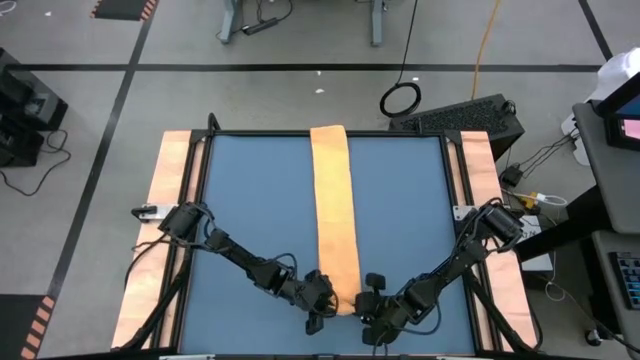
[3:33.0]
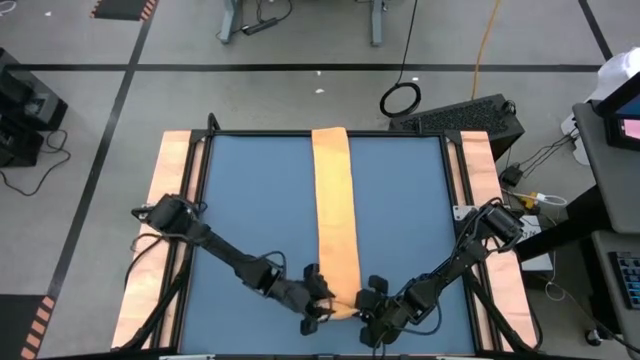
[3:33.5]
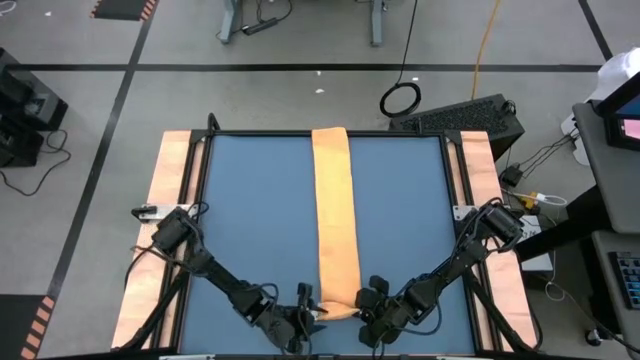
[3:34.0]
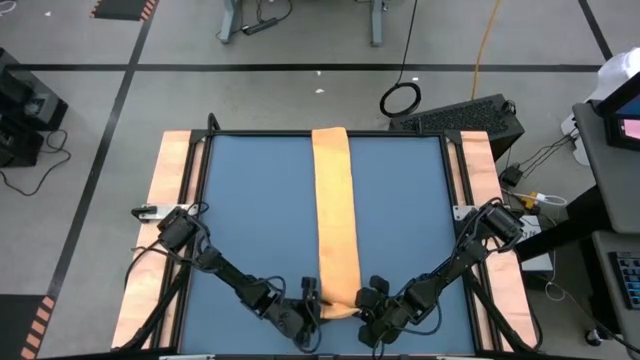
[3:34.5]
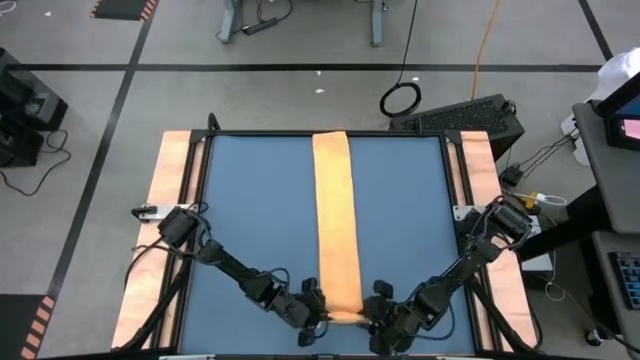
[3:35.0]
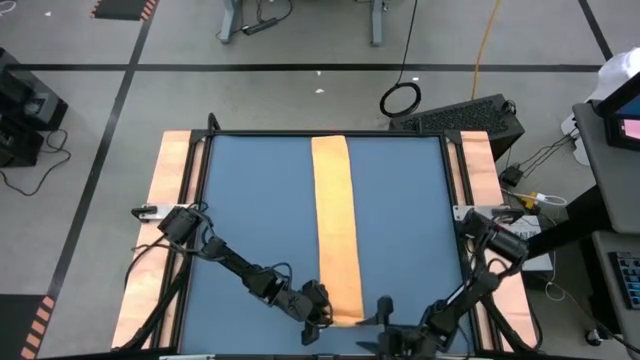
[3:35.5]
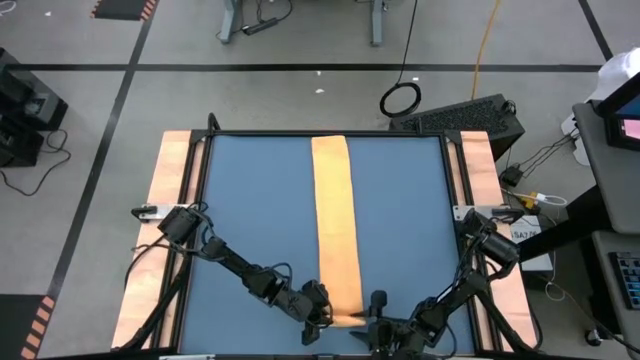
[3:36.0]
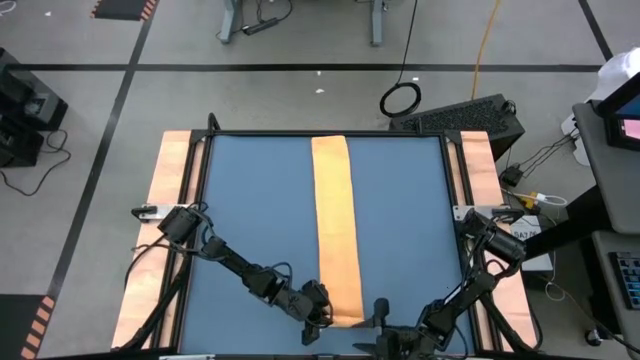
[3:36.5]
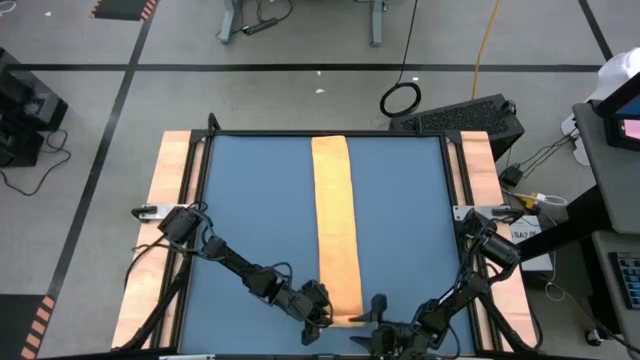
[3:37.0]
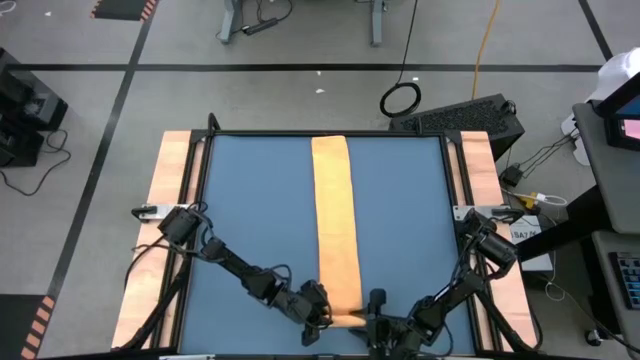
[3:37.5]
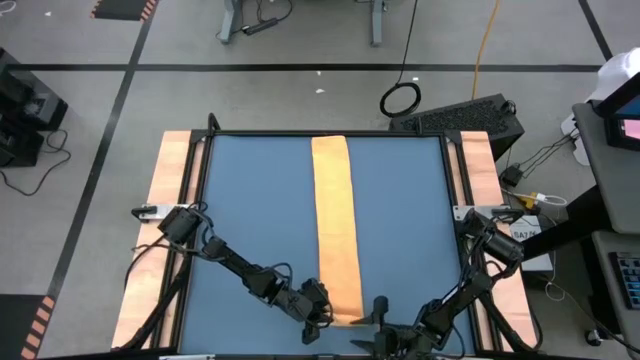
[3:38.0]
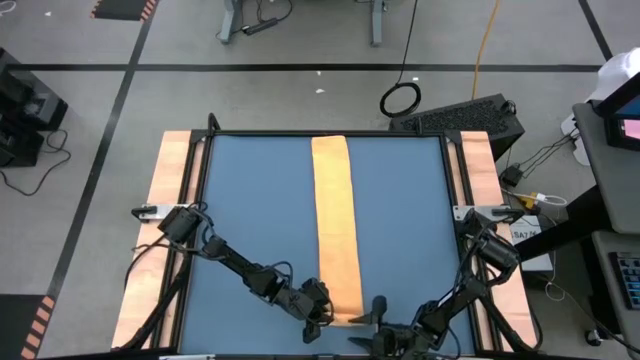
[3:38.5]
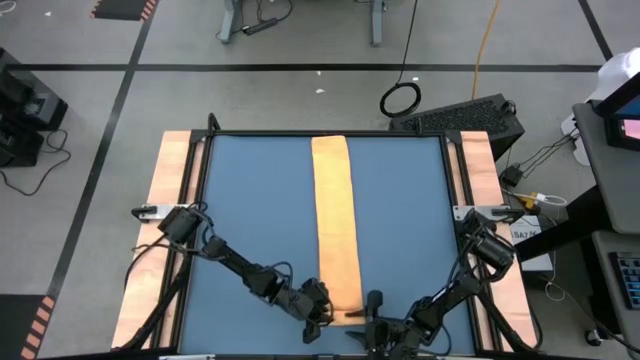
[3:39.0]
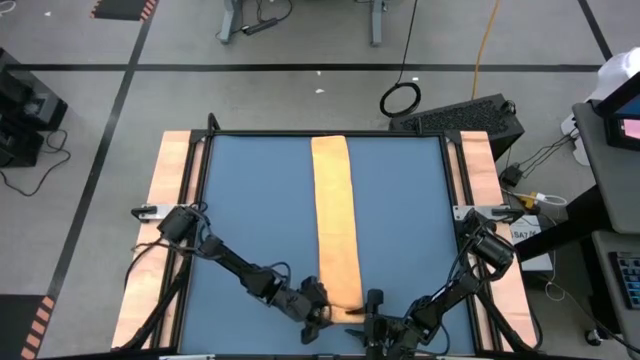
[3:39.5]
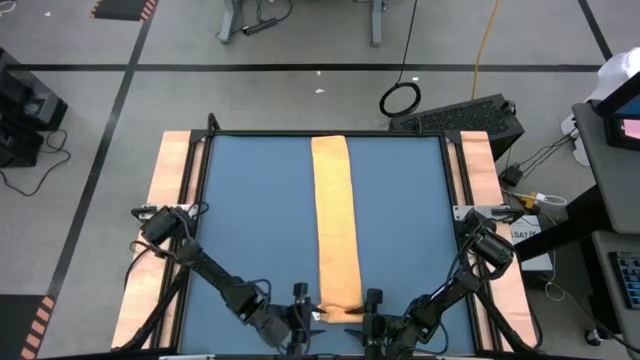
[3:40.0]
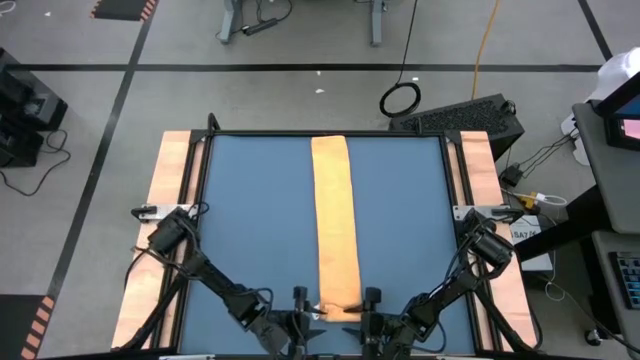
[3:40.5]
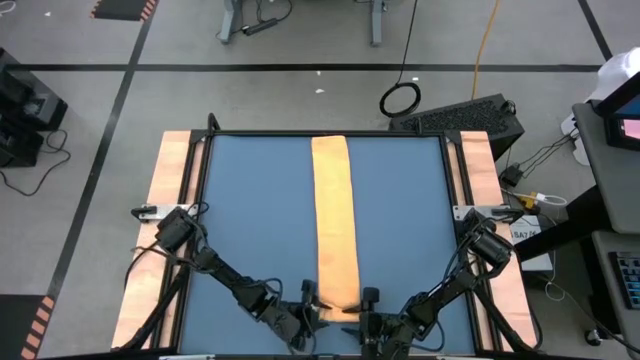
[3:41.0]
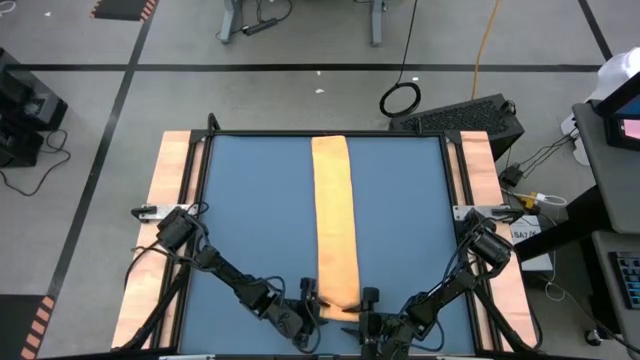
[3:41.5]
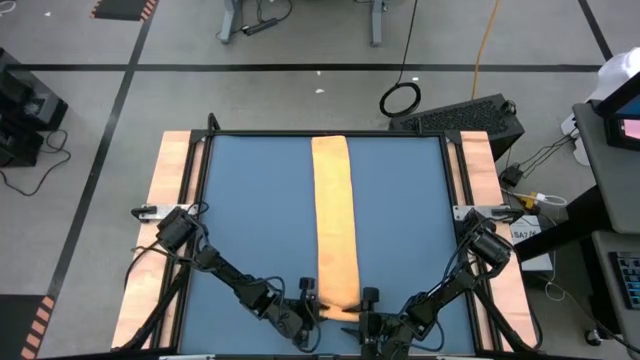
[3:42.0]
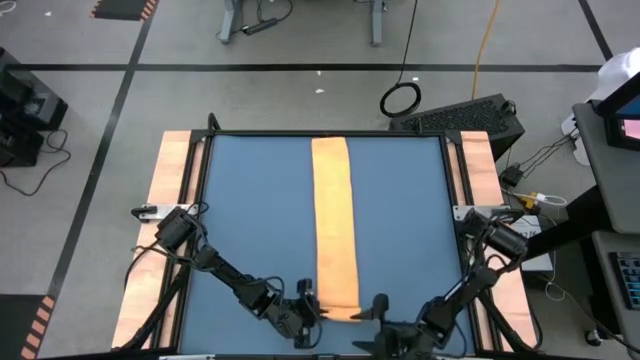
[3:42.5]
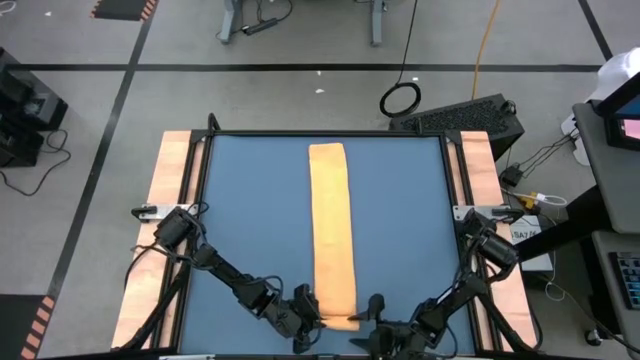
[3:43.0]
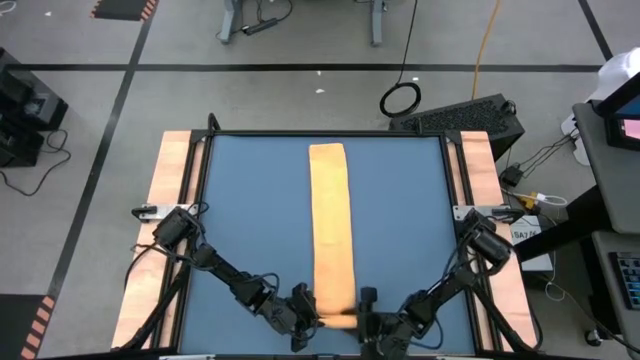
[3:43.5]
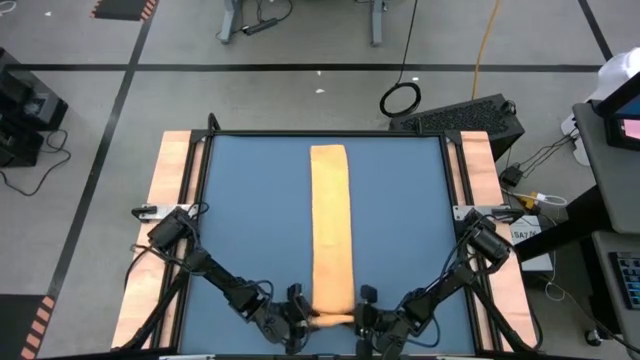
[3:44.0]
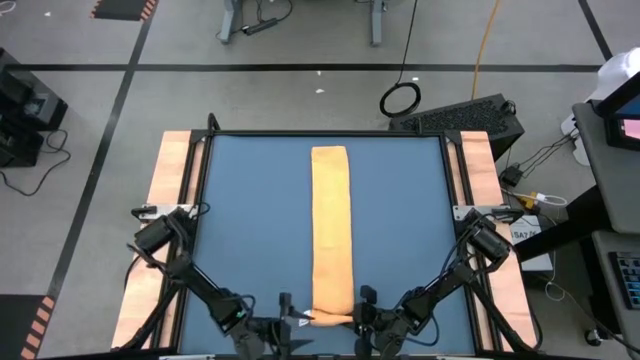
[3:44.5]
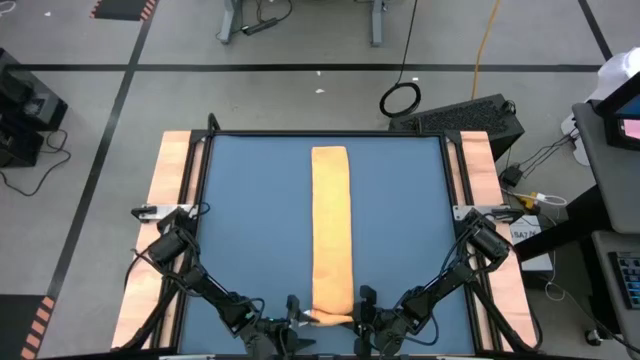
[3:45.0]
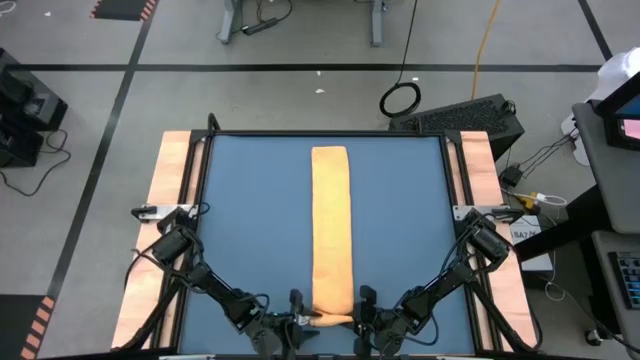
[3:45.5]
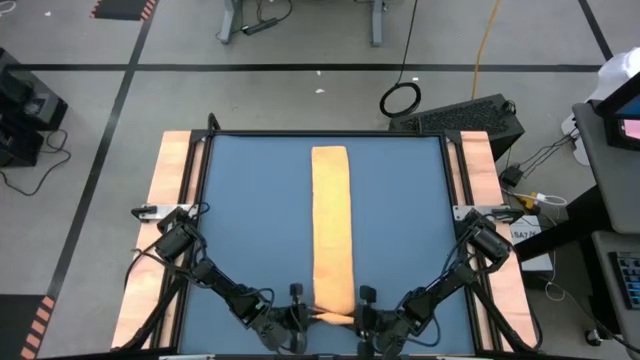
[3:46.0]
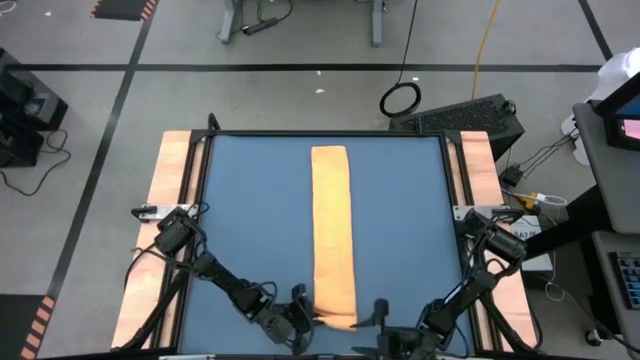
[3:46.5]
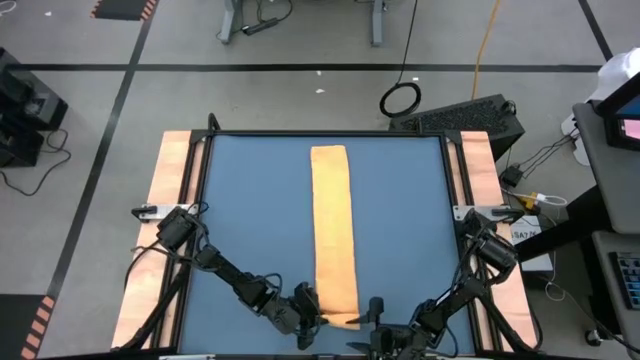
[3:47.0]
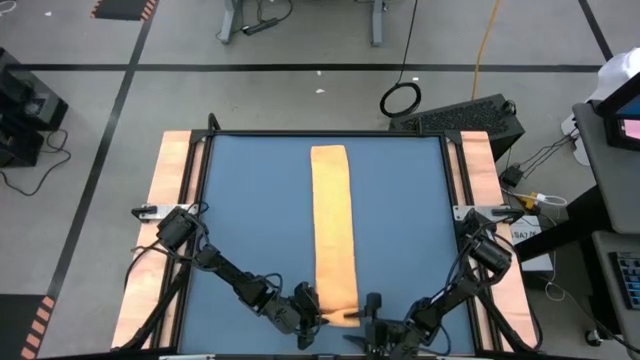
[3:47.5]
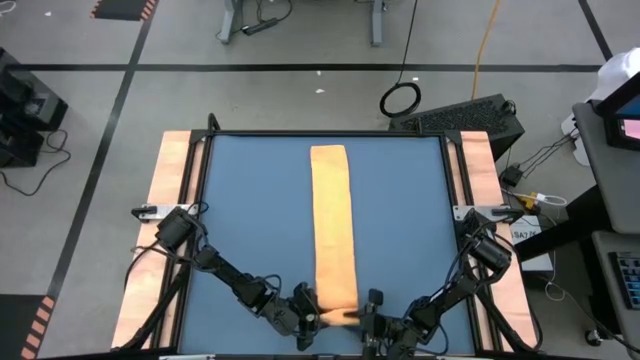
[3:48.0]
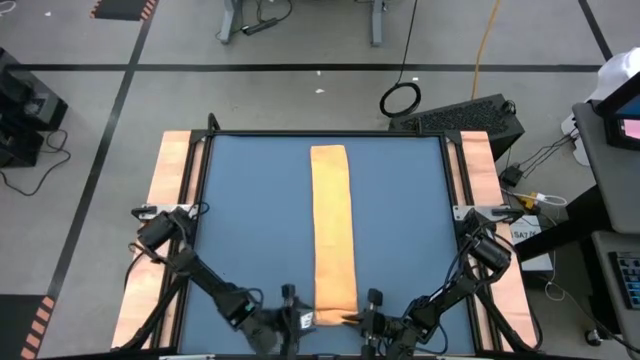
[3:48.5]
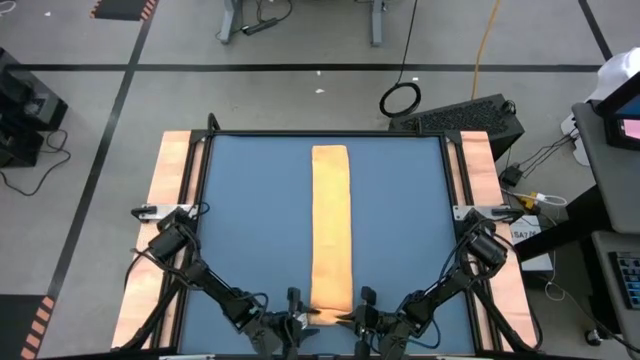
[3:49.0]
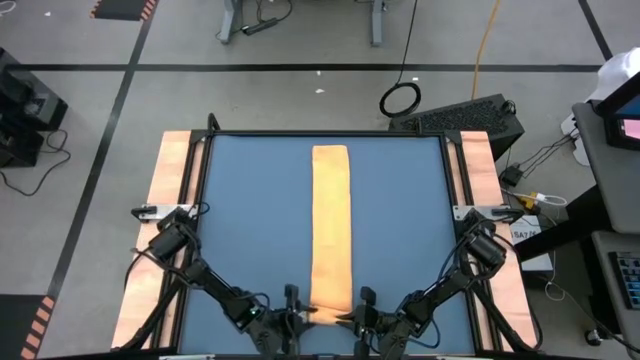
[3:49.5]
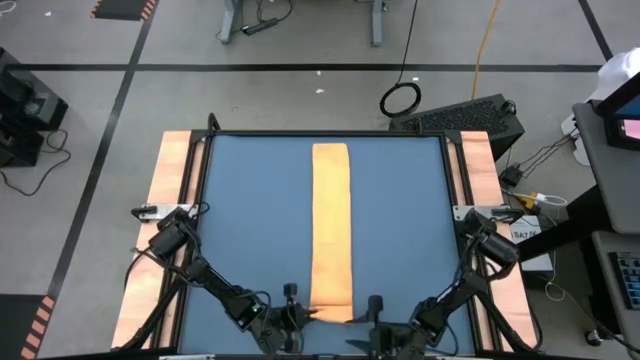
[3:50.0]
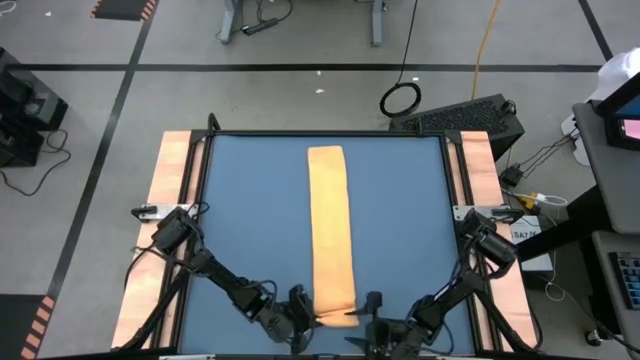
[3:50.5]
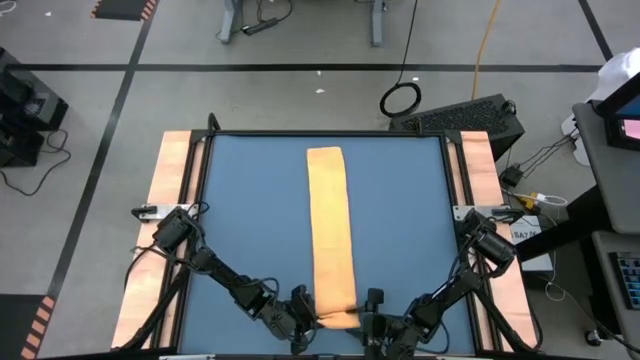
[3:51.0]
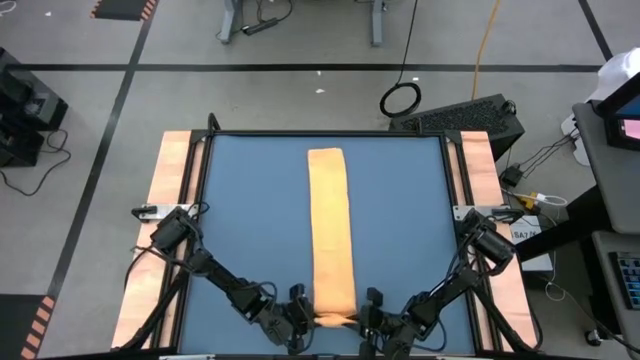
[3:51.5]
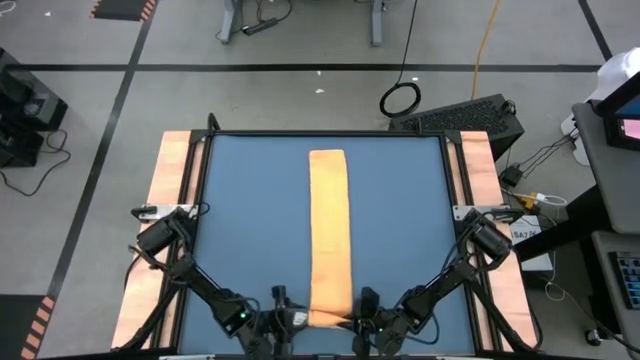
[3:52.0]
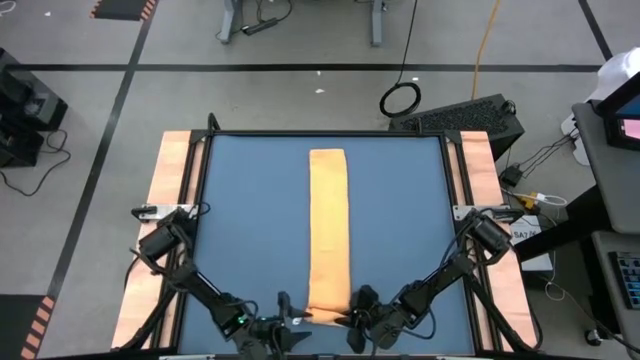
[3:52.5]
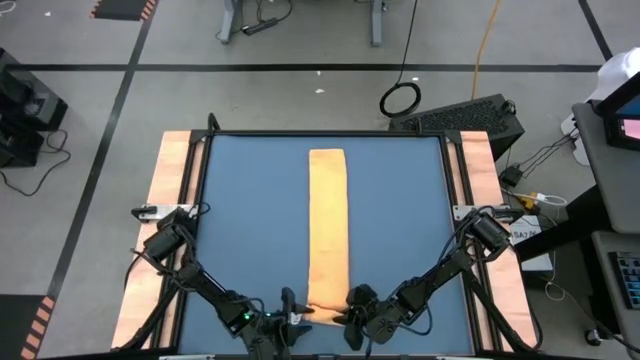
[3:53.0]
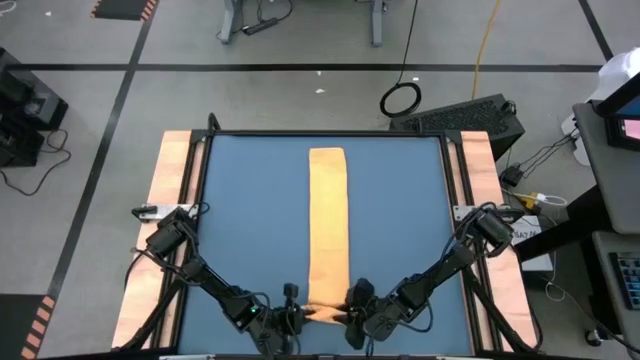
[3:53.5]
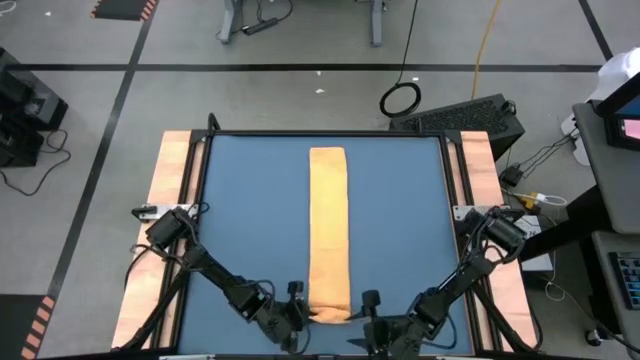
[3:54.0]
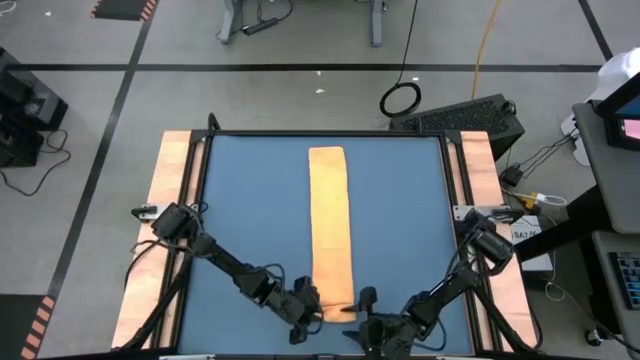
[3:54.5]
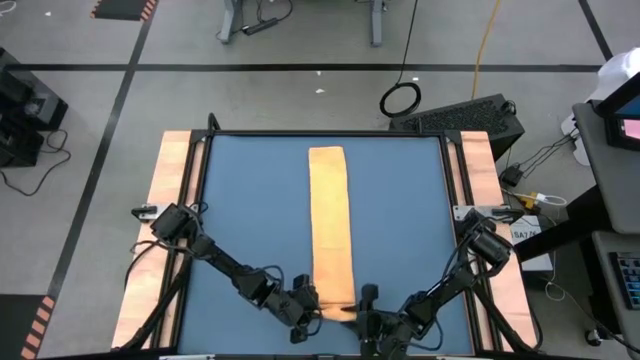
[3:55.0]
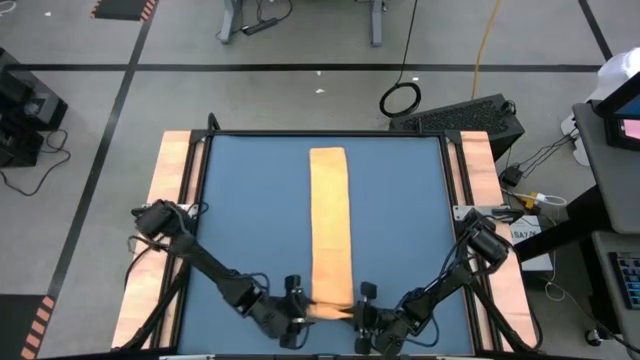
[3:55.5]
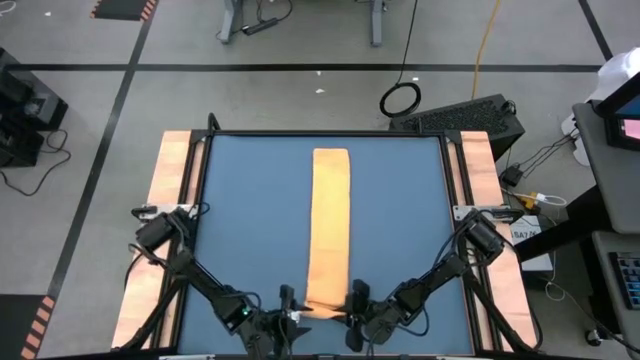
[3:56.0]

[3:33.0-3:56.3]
Task: Roll towel into tight, uniform cylinder
Roll the orange microfiber cloth
